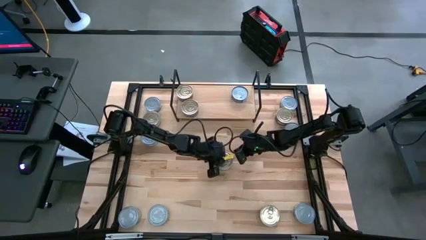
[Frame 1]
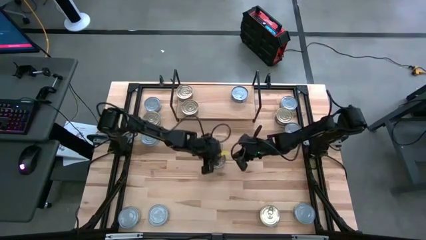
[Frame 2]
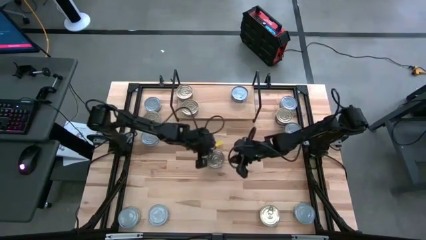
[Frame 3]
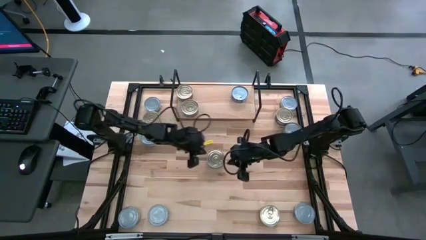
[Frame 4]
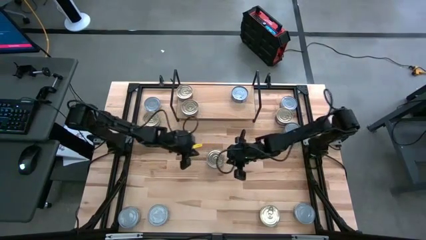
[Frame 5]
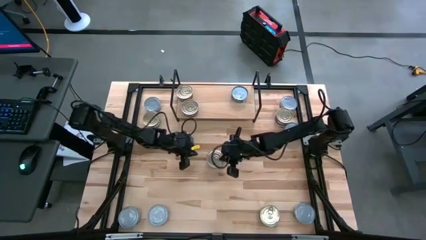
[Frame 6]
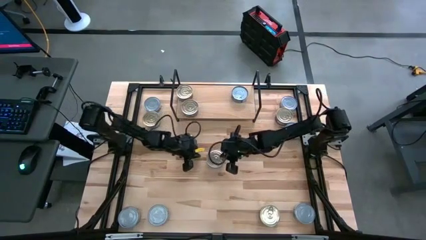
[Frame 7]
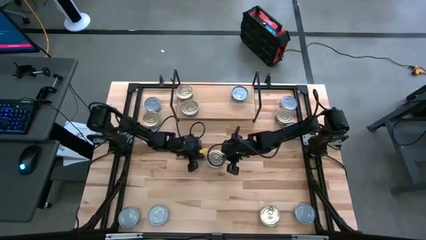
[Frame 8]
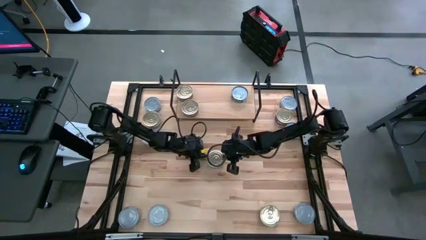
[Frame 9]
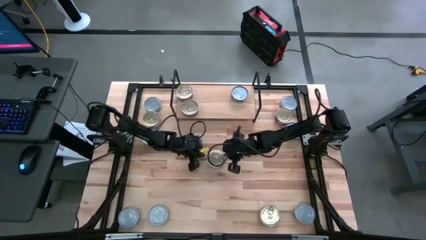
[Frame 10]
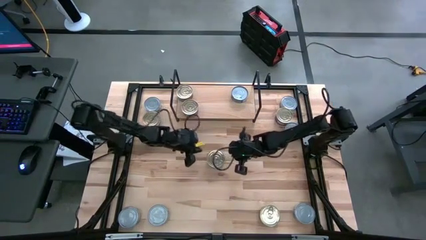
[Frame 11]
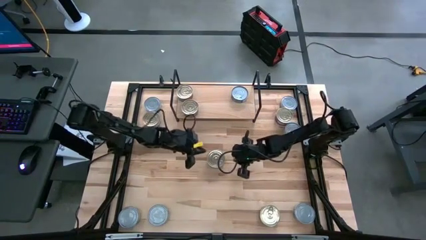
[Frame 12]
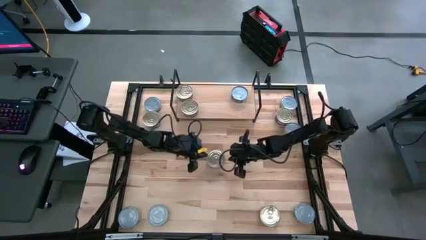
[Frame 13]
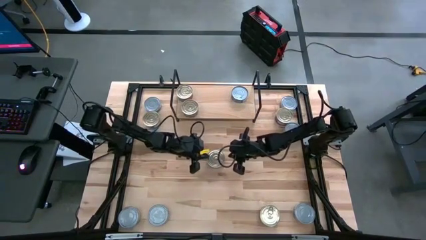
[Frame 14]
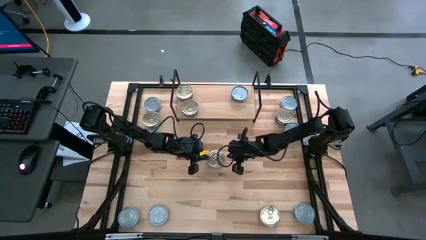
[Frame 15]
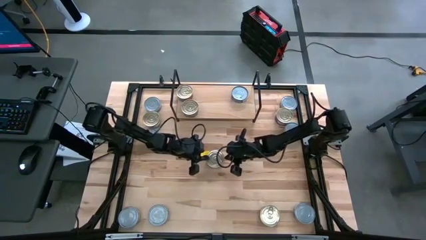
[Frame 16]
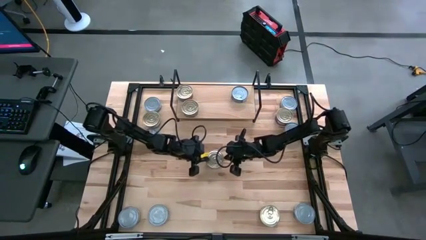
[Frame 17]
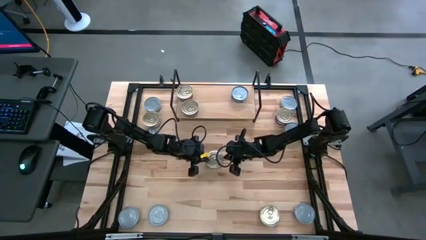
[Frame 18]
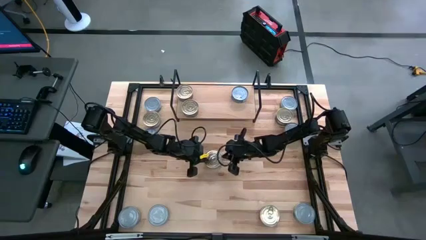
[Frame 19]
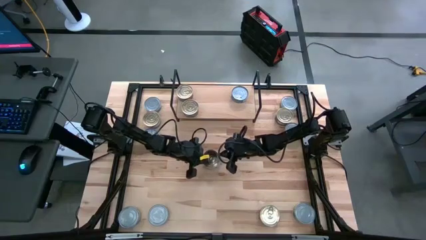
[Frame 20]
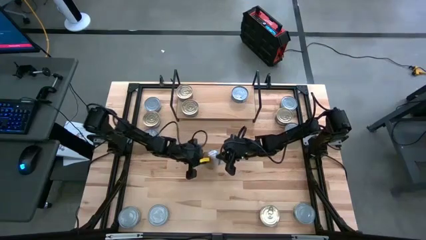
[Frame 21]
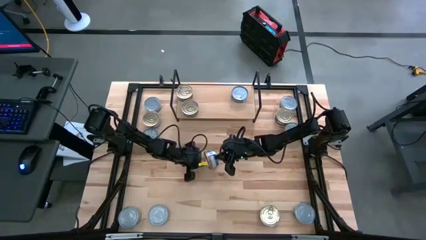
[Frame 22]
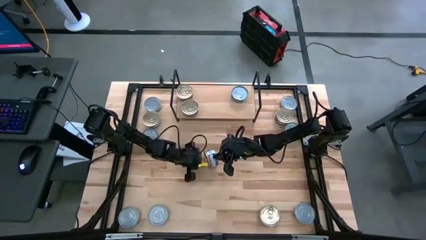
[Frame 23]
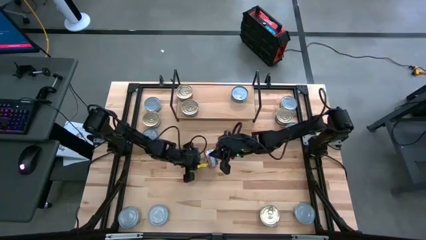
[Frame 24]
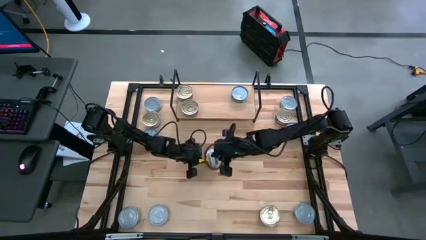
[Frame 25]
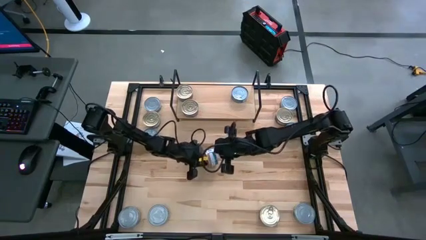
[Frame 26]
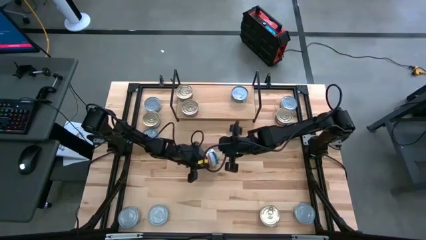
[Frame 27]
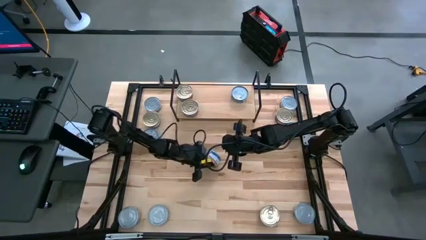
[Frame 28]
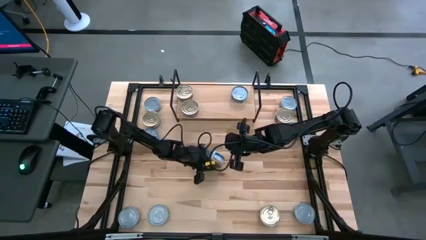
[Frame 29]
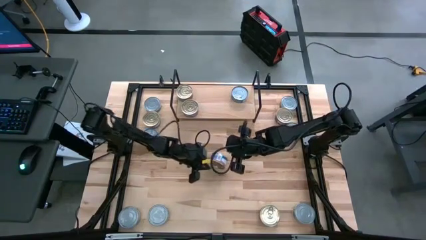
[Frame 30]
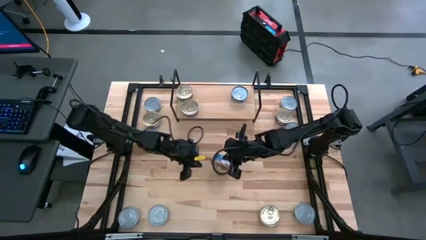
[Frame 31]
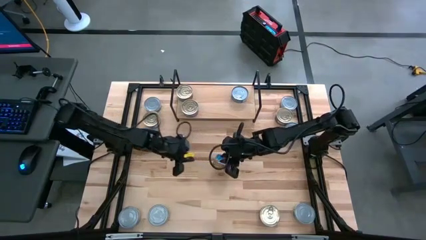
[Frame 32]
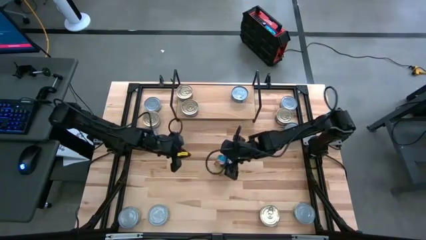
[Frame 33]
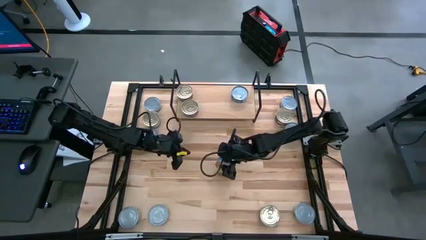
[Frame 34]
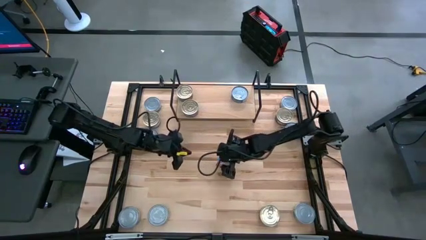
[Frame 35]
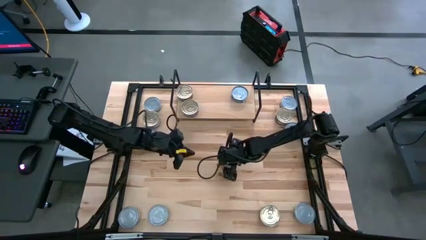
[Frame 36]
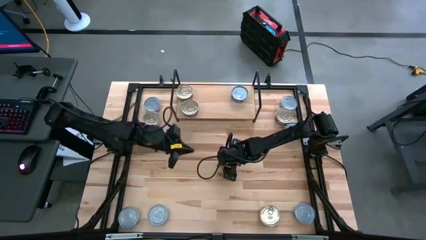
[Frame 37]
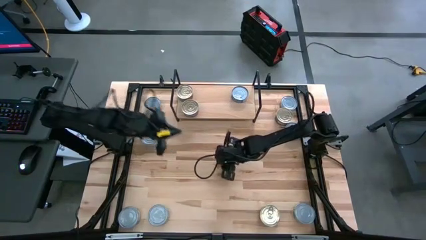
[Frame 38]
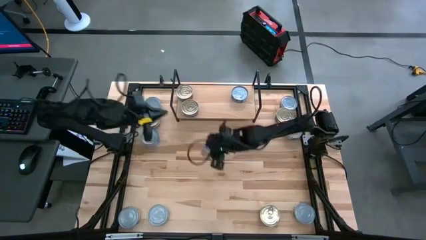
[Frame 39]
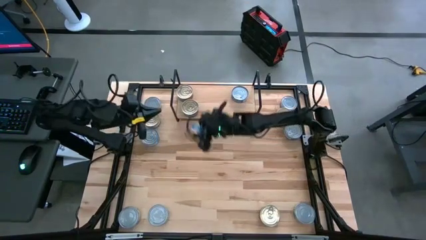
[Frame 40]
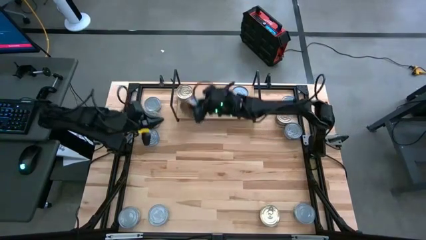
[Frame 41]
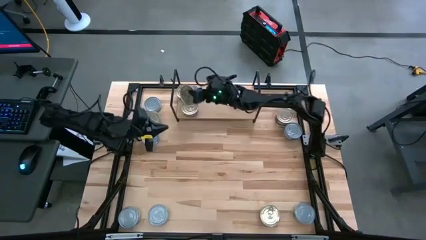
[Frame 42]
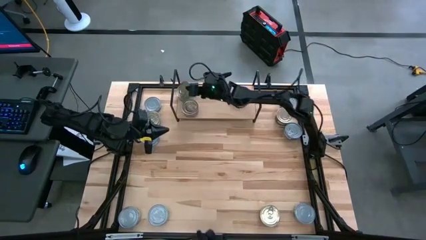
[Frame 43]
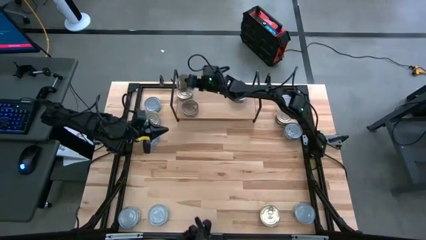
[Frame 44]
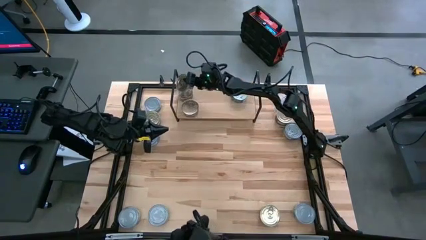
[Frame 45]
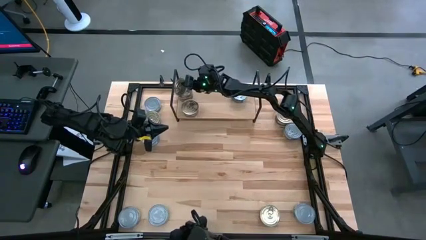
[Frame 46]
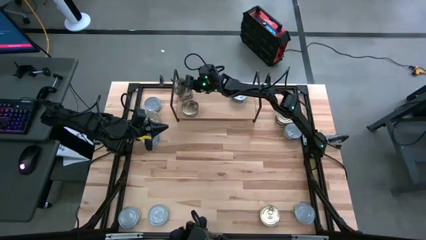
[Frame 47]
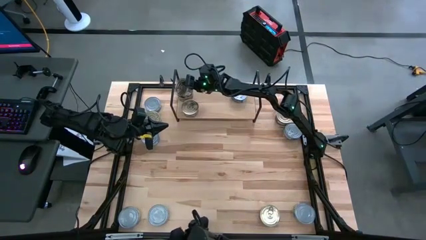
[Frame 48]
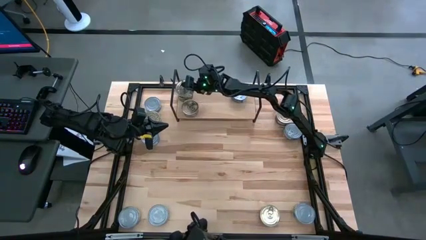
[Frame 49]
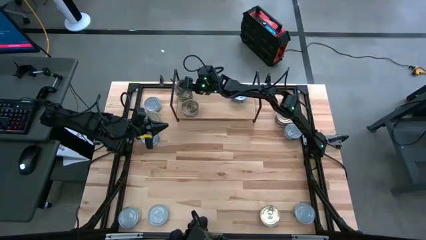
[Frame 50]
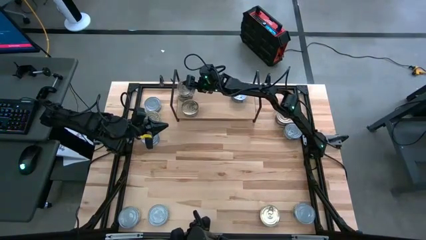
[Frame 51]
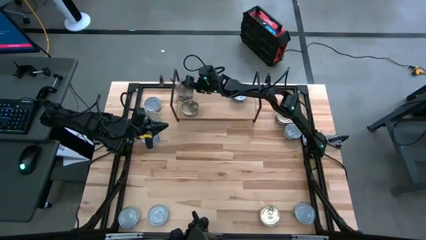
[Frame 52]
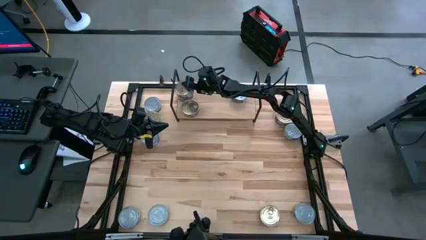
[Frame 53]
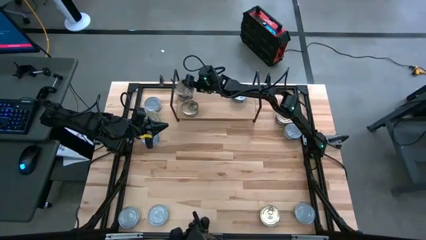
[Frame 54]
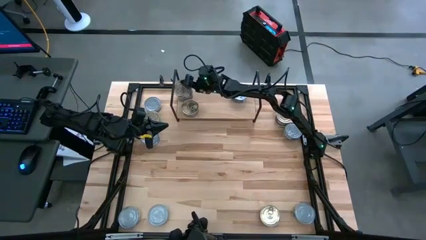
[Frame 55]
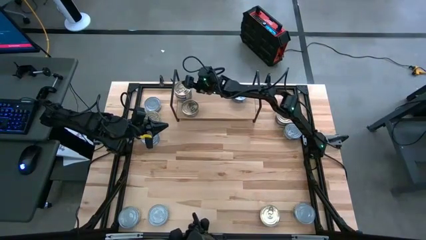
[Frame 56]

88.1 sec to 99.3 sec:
Task: Stack canned seafood by type on shelf
Stack the blue pink tuna can on top of the other blue pink tuna can on the shelf

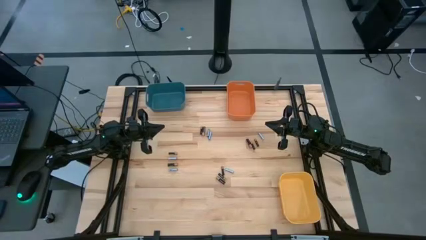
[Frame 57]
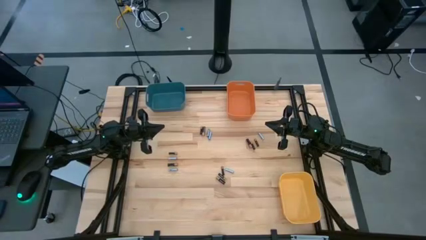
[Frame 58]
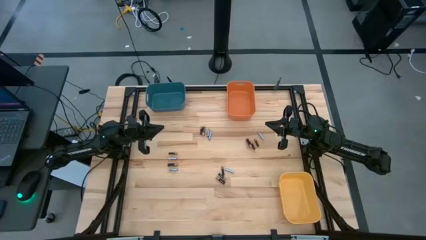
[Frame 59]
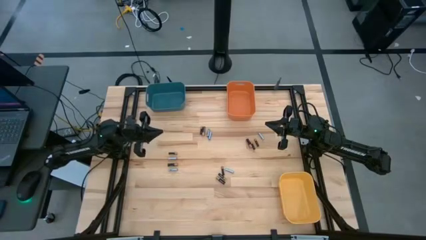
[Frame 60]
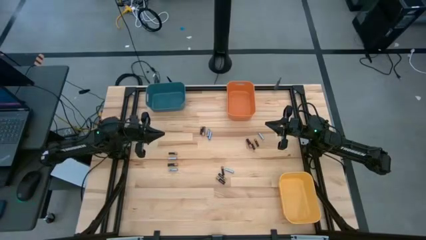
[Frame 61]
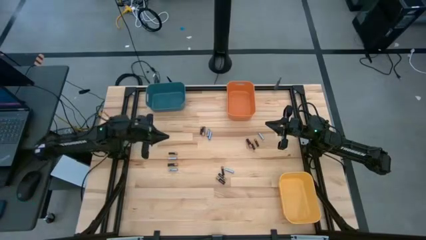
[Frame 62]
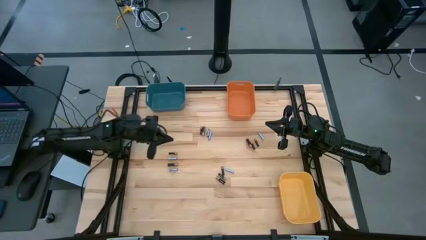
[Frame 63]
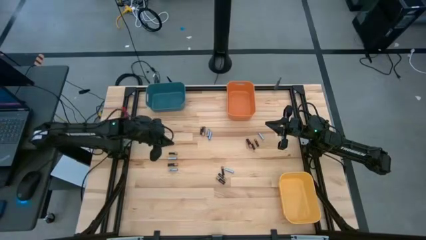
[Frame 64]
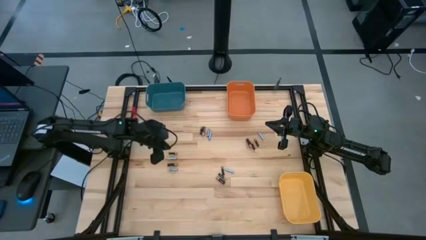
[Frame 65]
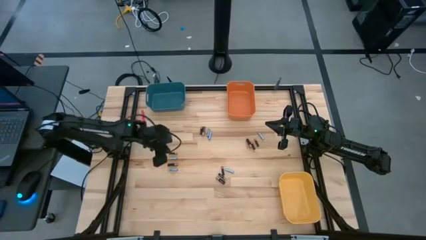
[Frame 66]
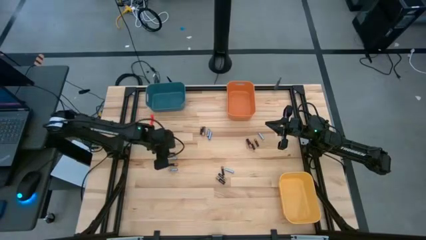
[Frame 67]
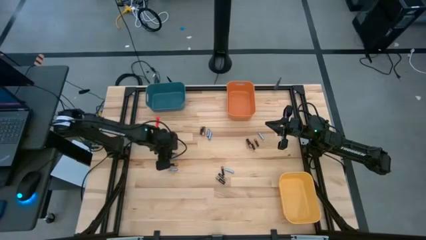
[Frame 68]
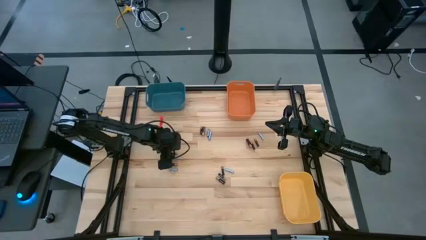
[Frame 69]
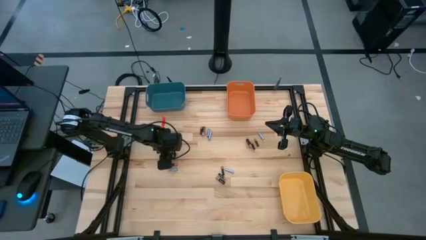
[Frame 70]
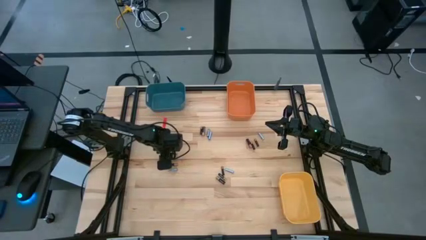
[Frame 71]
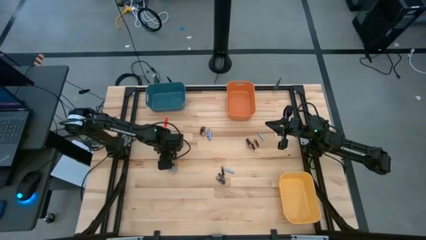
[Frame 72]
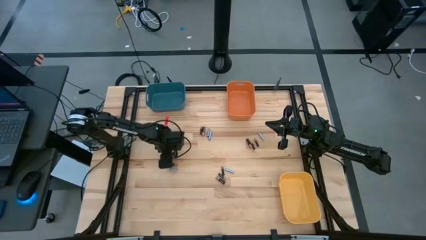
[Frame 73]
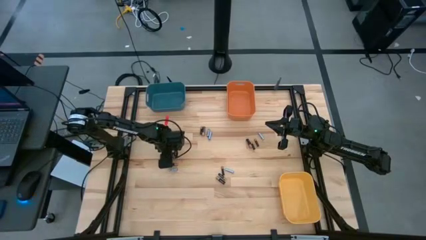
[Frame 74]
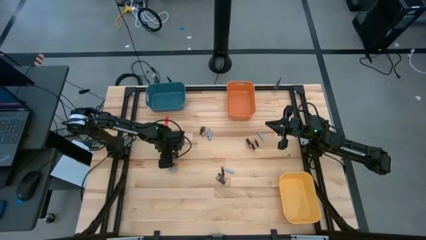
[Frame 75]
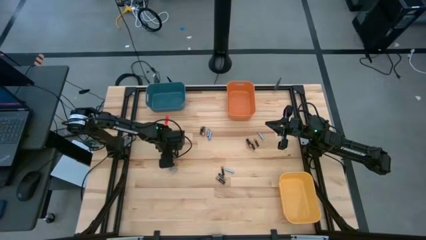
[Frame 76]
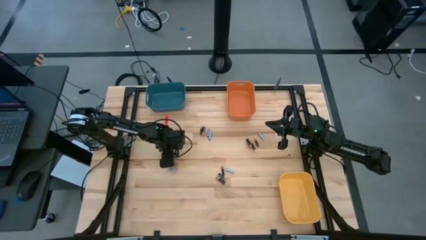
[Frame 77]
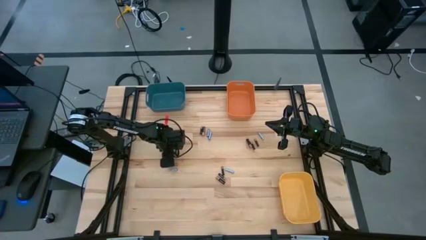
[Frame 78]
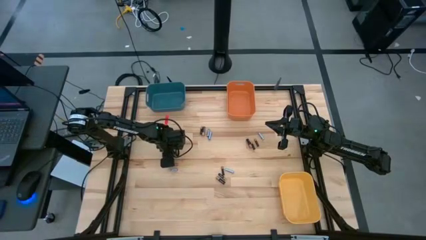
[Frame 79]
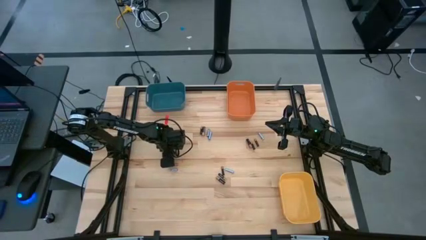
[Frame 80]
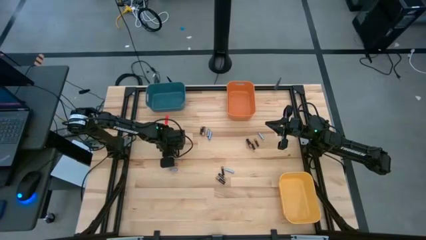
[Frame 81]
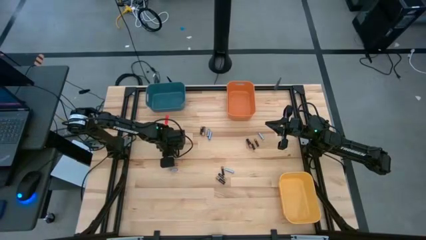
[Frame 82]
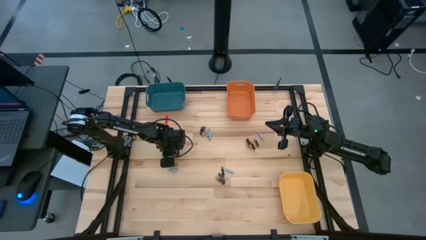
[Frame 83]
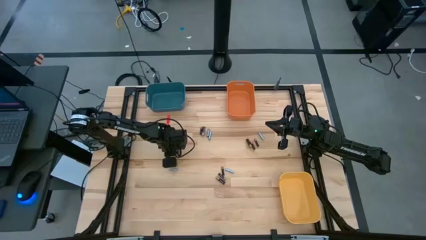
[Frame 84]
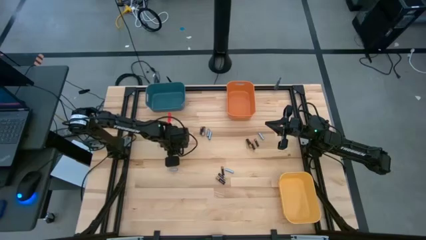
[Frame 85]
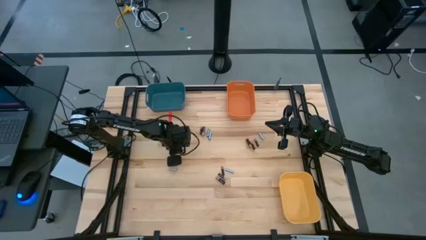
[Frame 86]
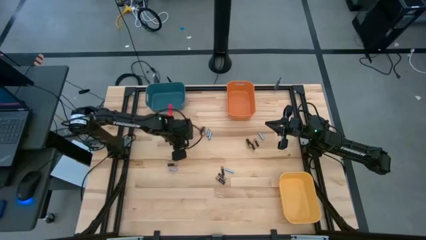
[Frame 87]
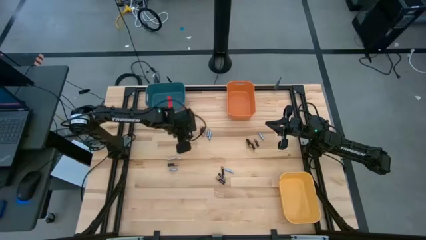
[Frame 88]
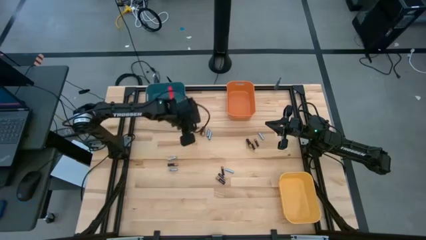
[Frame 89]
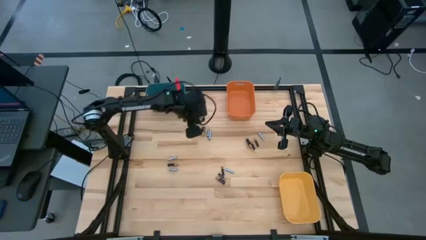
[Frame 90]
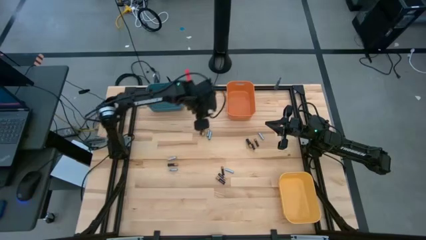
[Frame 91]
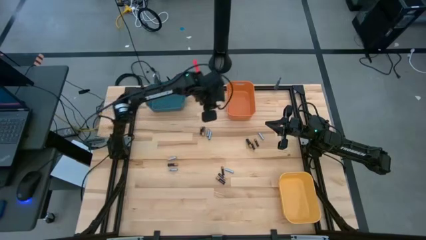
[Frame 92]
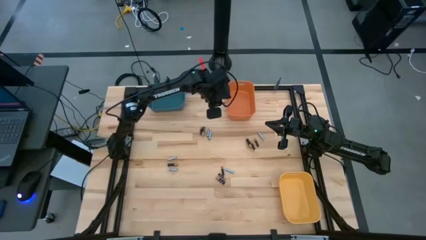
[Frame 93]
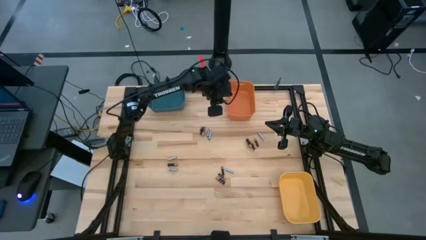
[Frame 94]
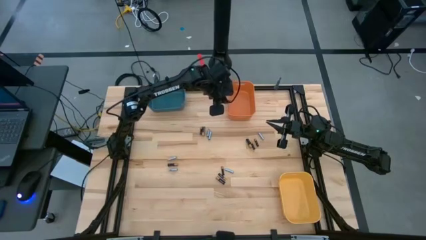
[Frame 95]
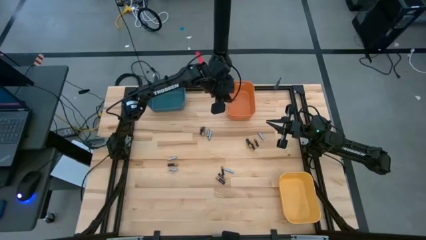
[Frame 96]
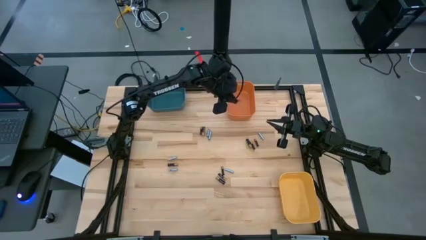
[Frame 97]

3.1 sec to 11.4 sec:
Task: Sort batteries
Put the small black battery into the orange bin
